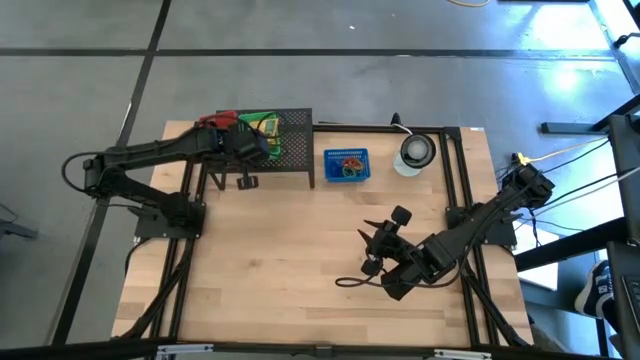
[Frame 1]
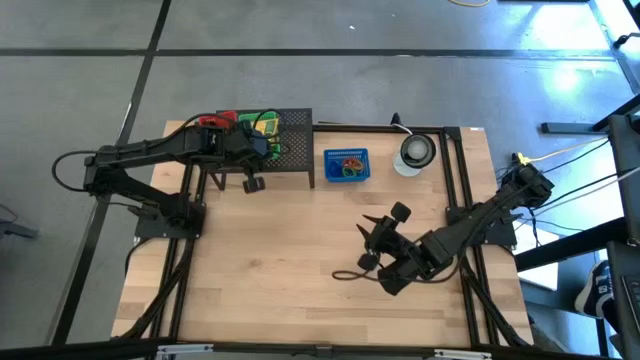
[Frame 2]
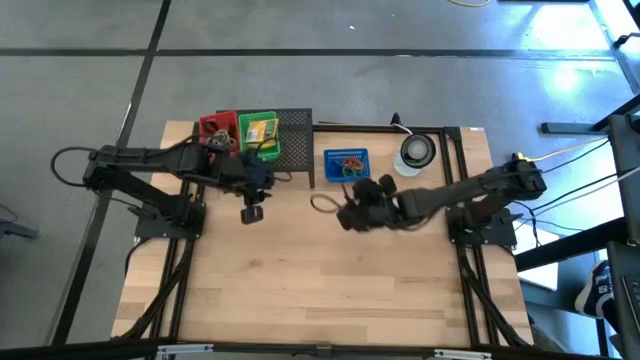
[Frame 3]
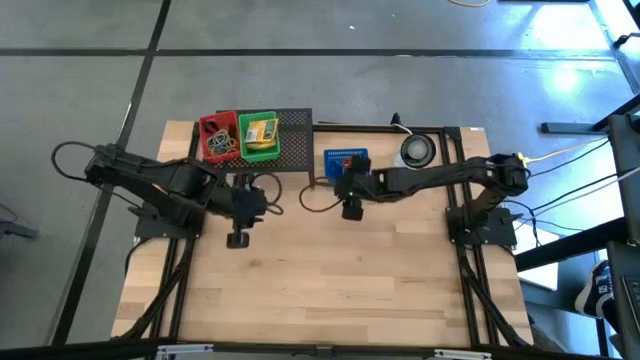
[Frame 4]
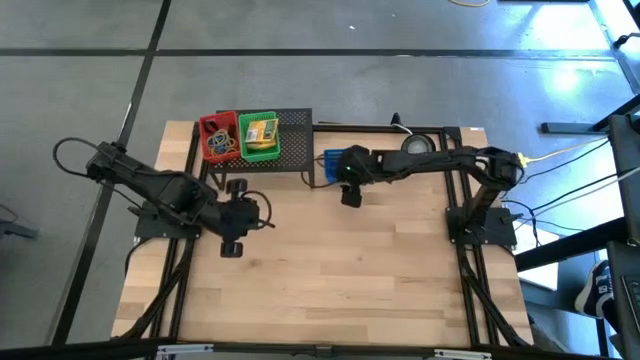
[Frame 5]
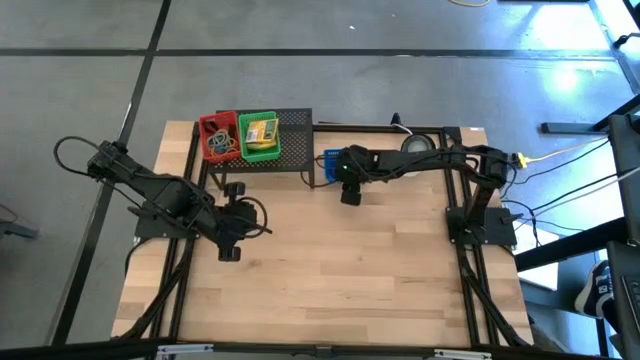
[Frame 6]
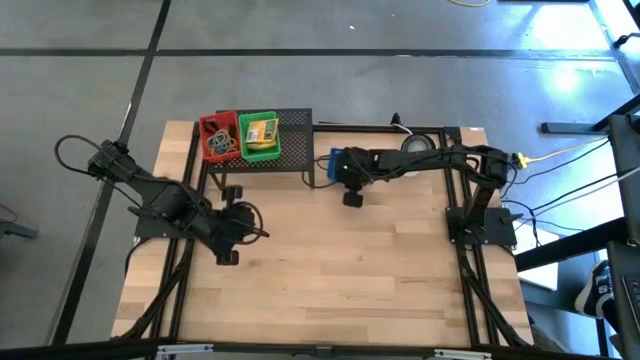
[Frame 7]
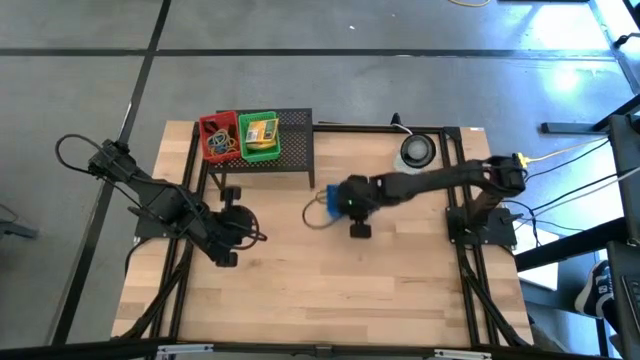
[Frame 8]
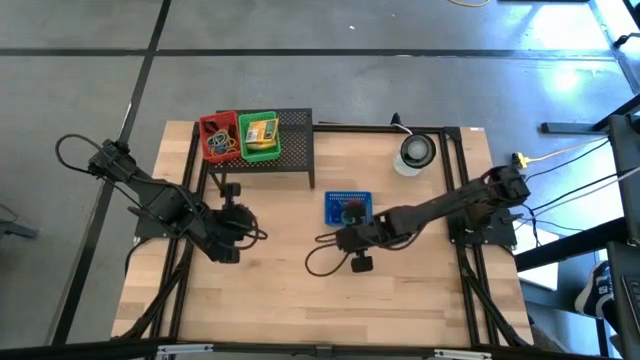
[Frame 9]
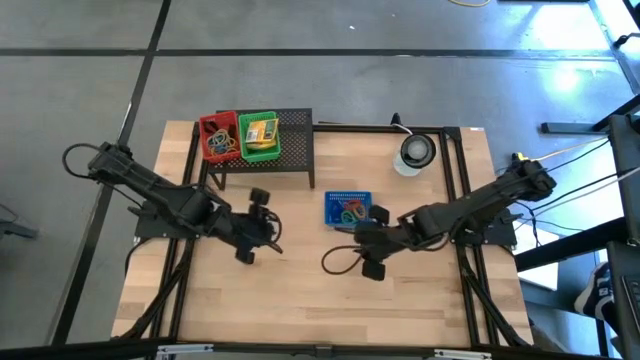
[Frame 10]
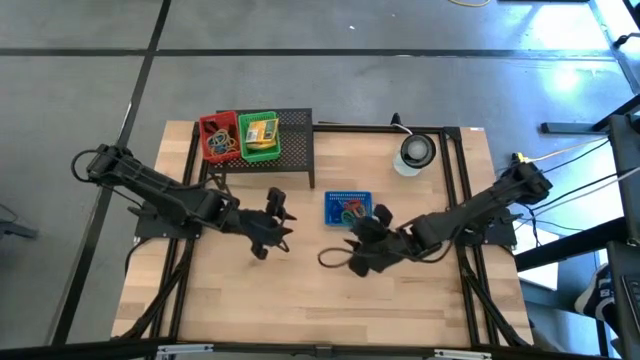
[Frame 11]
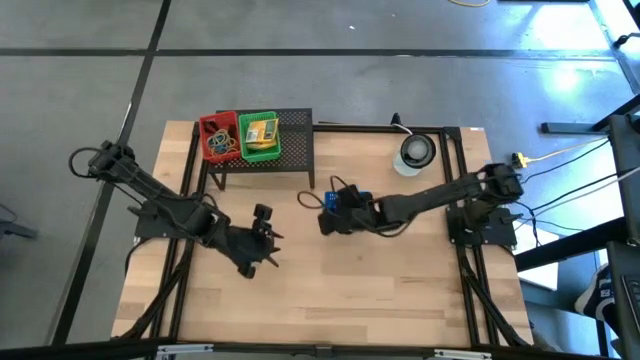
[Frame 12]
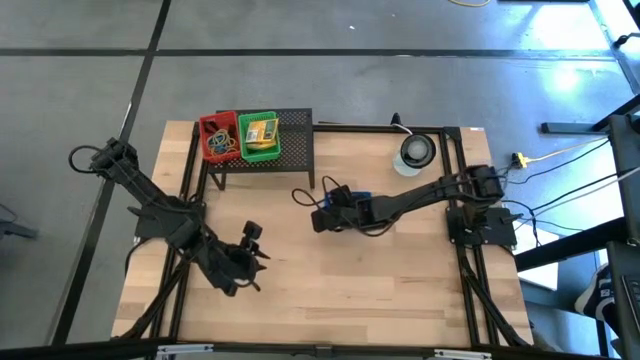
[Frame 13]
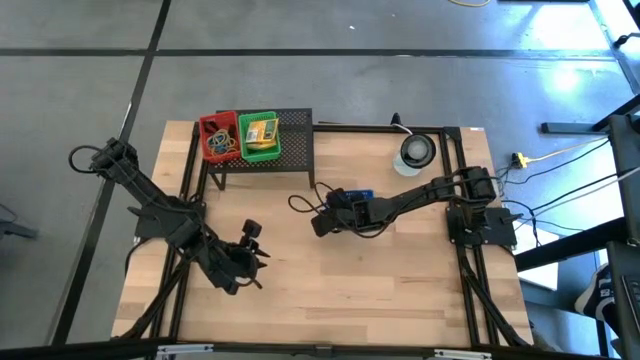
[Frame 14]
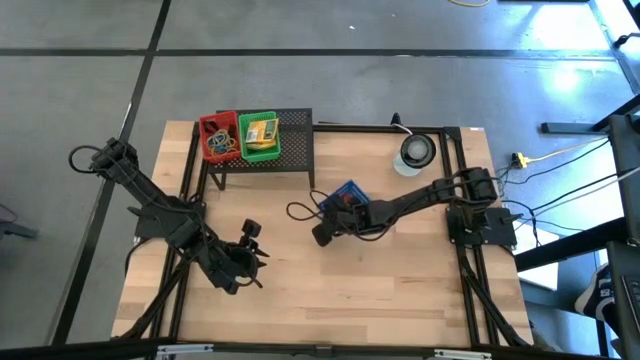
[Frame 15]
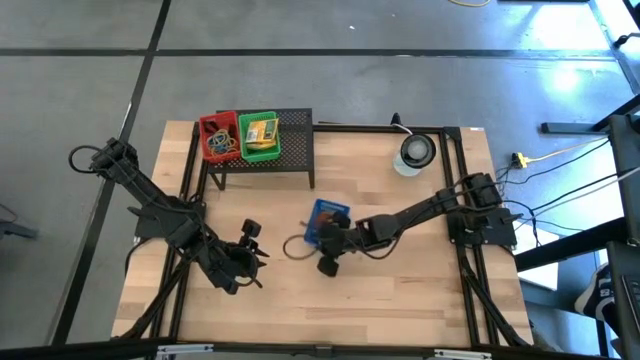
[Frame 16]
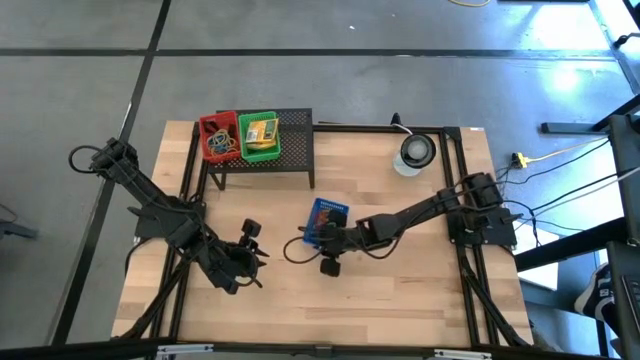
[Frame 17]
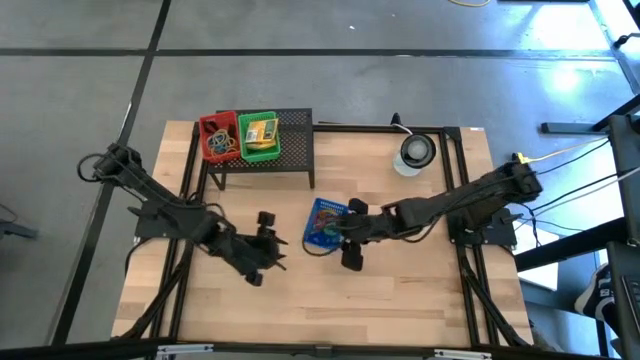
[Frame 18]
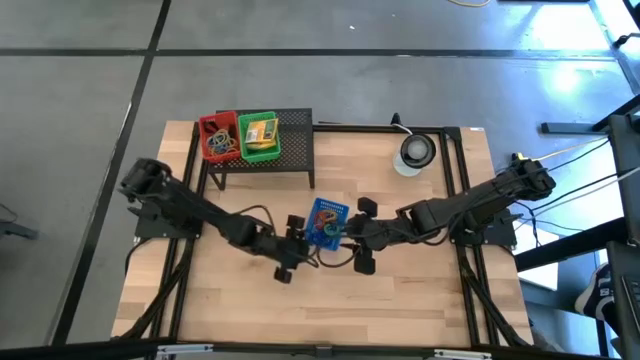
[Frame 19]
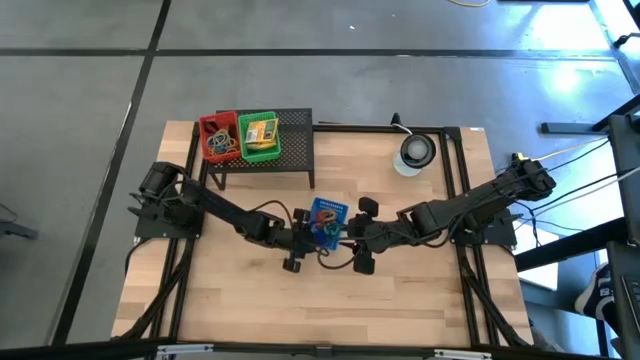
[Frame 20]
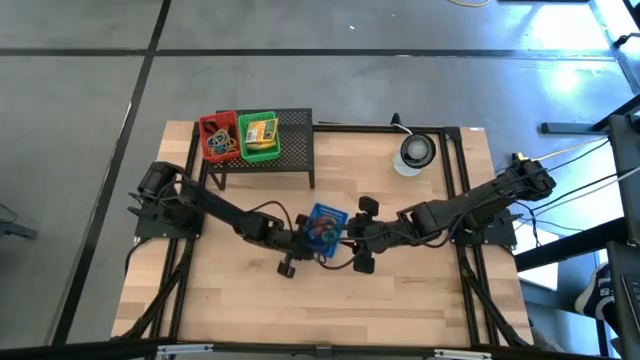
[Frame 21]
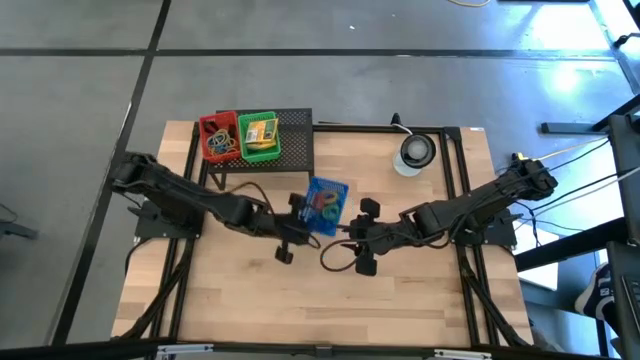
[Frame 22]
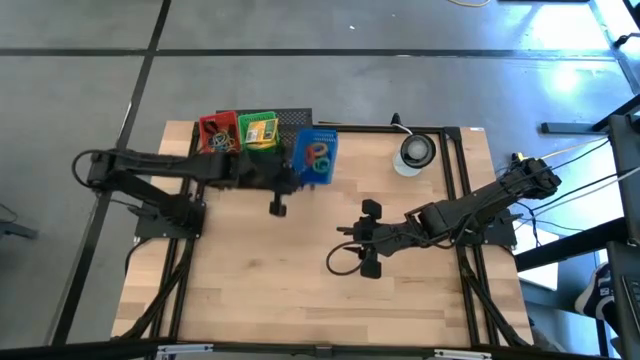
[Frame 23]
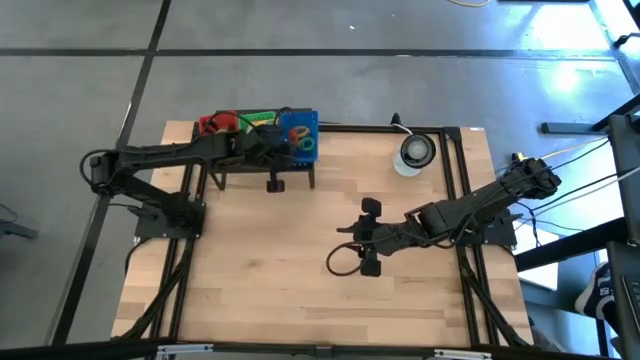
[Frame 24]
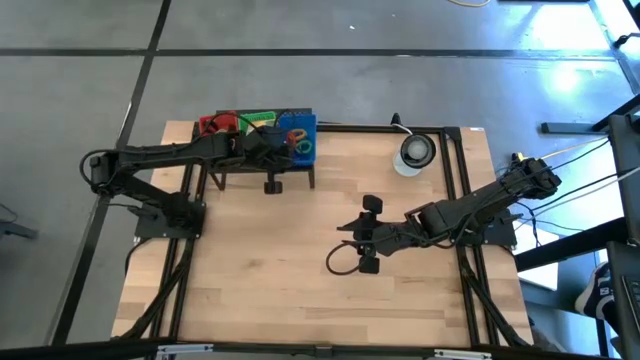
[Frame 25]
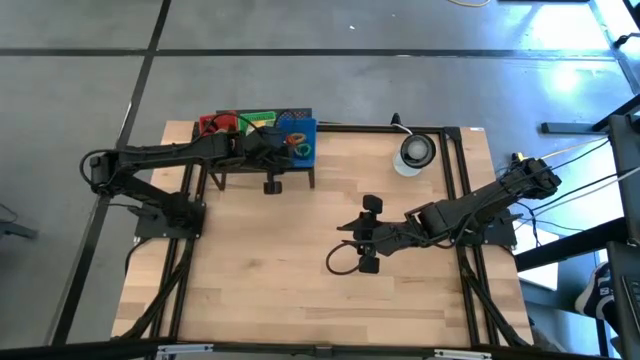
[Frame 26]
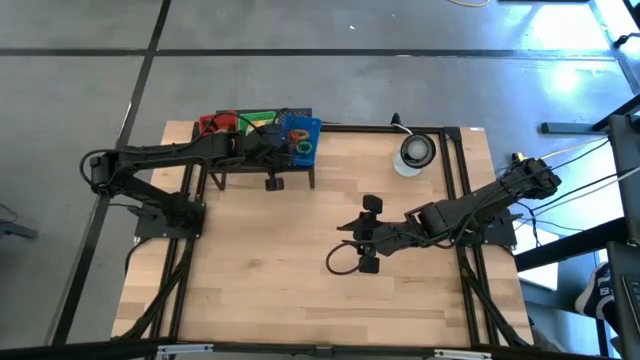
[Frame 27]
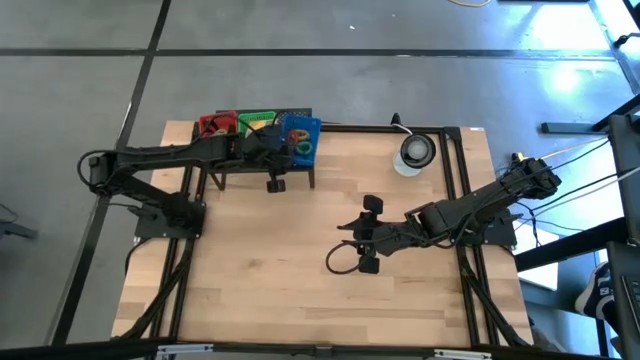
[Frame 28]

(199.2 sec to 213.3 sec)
Task: Pick & Place Office Desk Supplies
Put the blue basket on the shelf

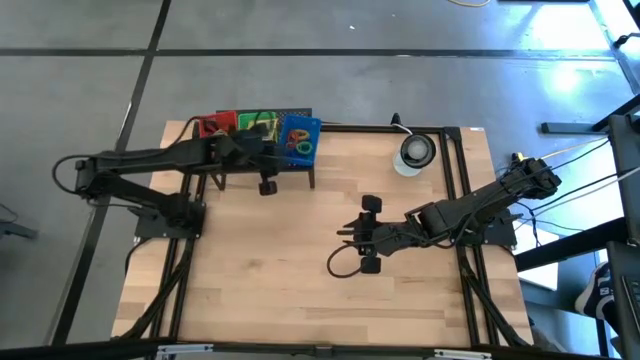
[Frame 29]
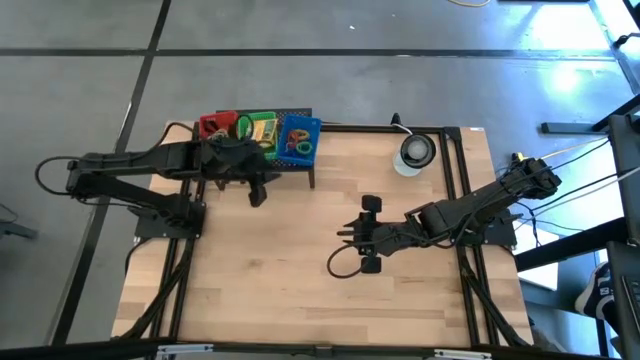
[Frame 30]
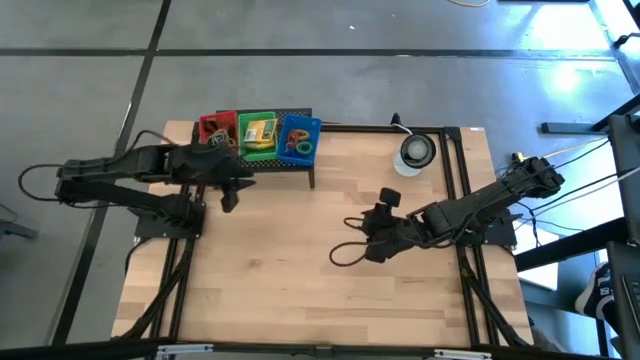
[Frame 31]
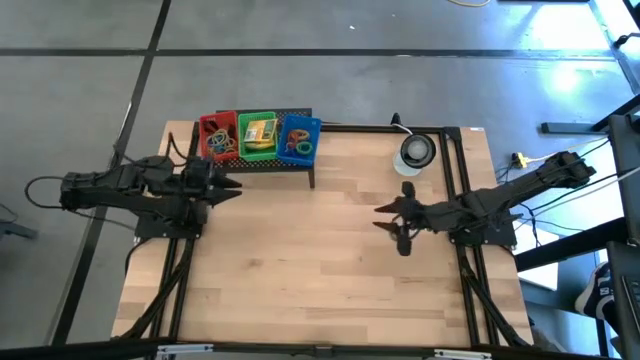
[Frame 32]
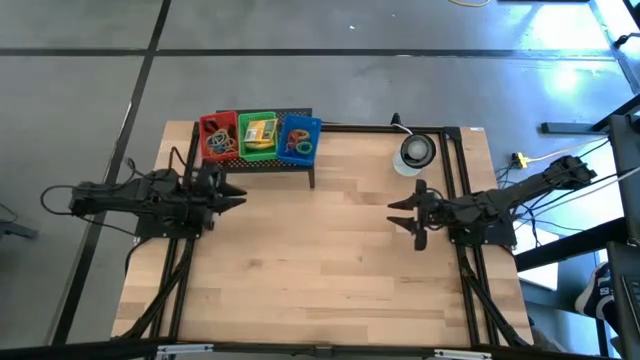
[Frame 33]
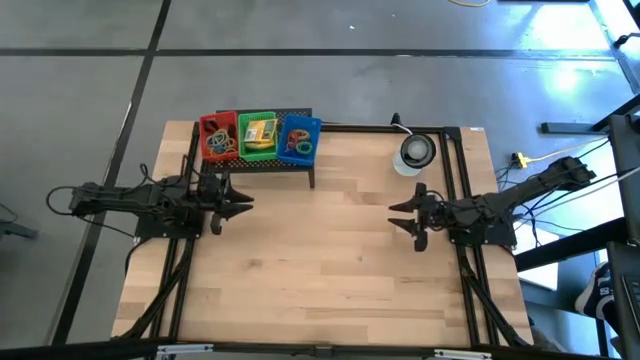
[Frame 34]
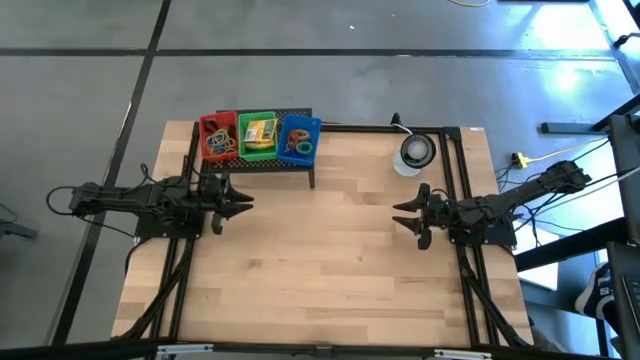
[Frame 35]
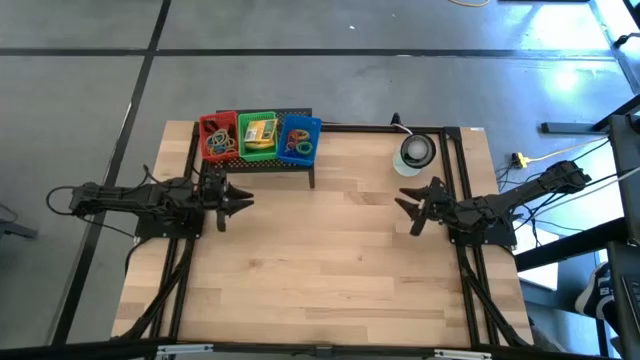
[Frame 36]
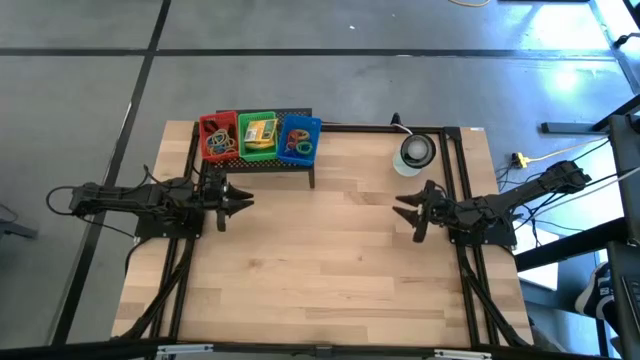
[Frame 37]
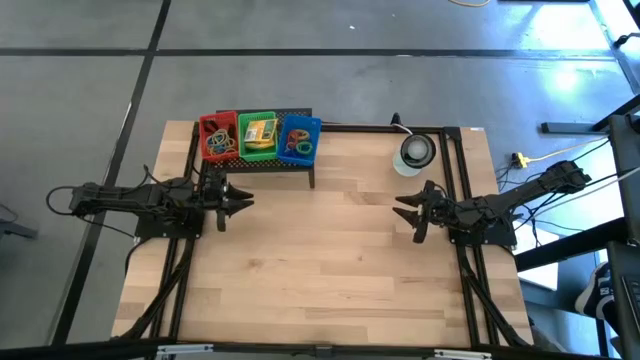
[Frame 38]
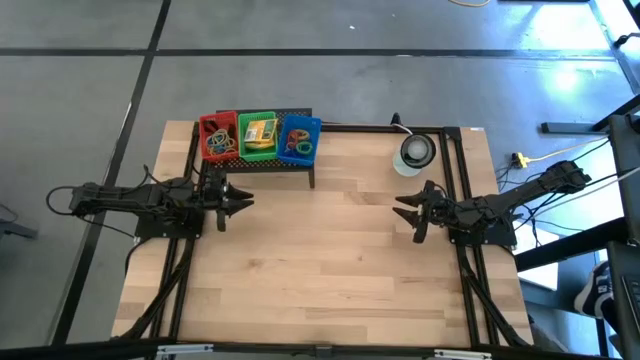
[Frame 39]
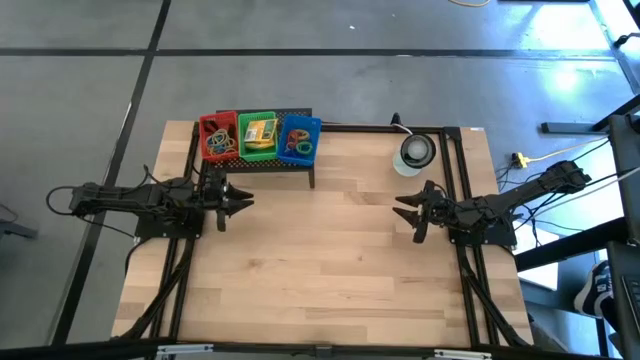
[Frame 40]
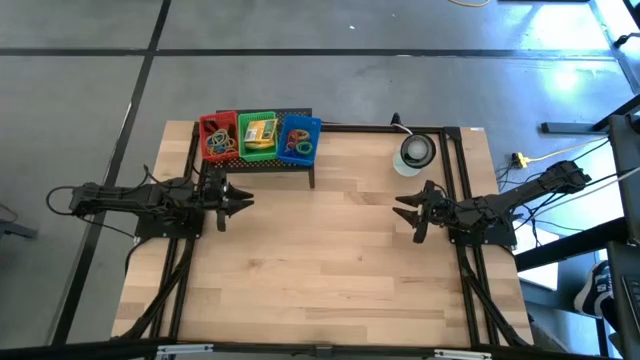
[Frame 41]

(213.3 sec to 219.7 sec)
Return to Home Position

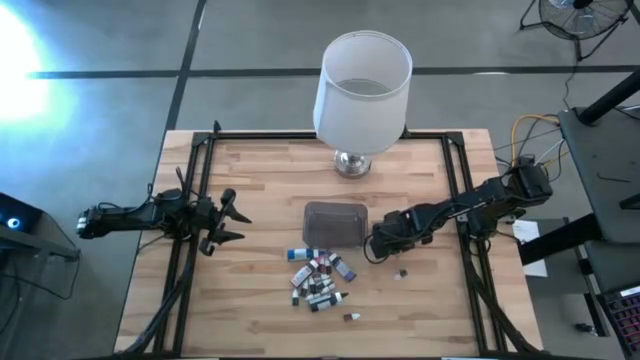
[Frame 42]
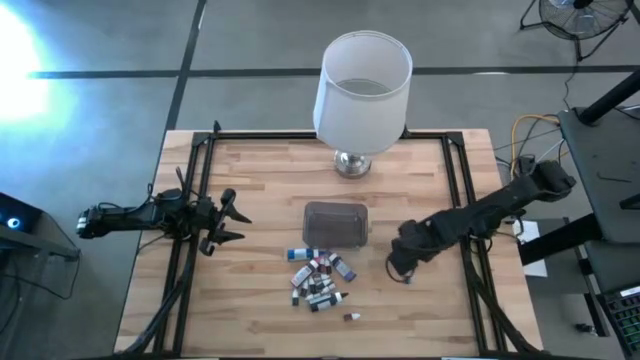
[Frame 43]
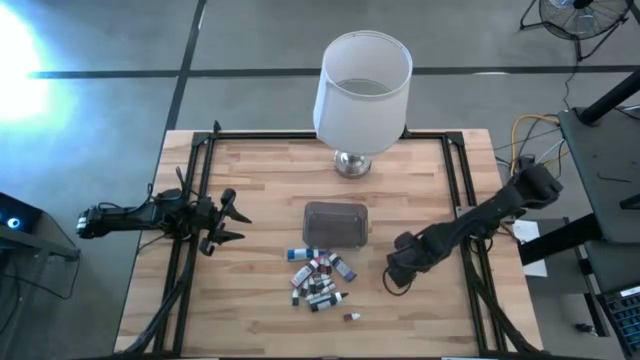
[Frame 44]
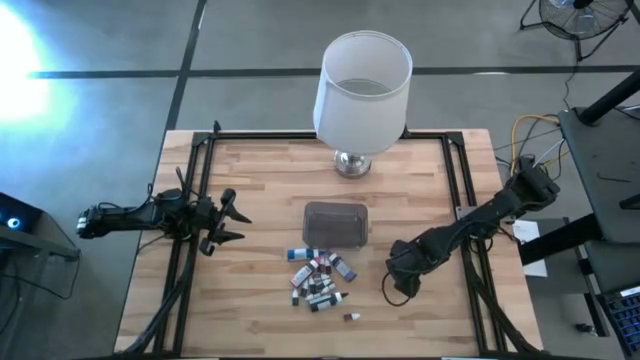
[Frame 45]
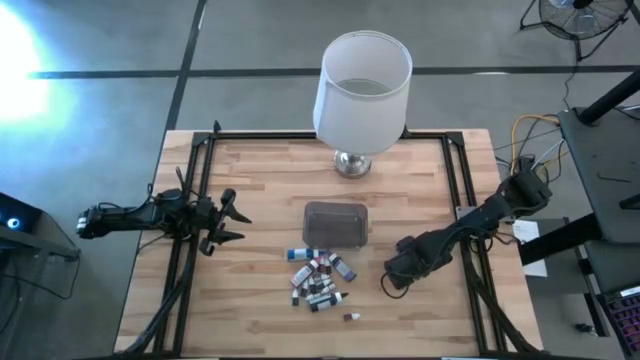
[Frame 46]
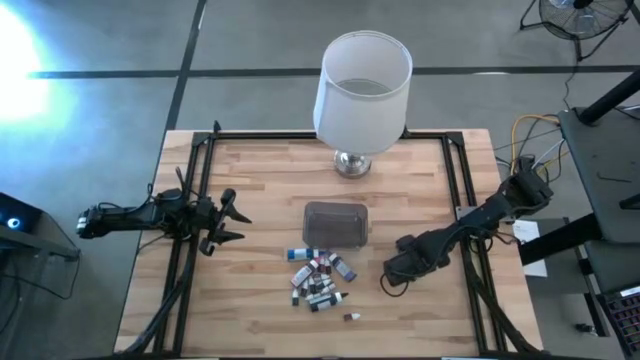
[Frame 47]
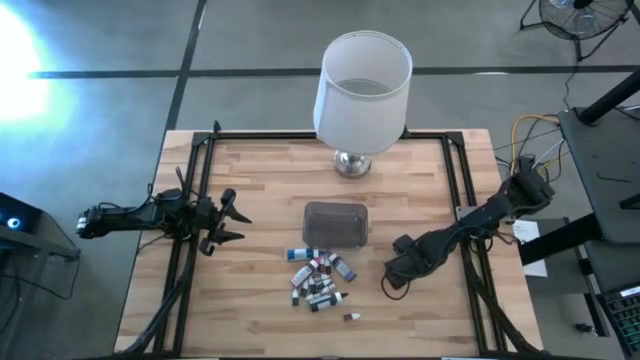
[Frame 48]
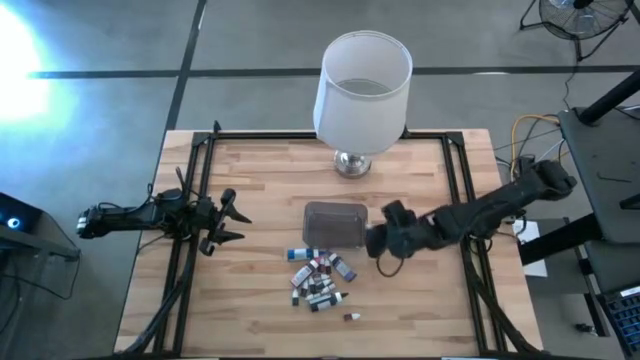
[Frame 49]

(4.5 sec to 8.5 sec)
Task: Pick & Place food coloring
Put the small blue food coloring into the black bin
